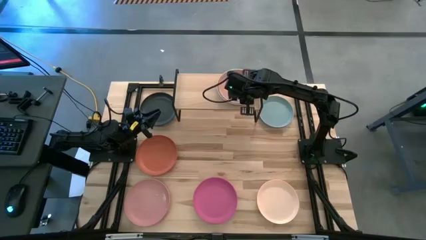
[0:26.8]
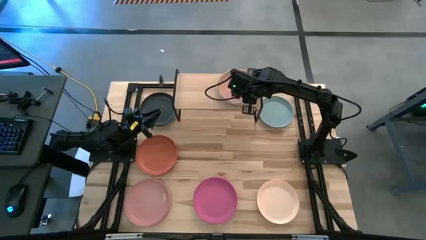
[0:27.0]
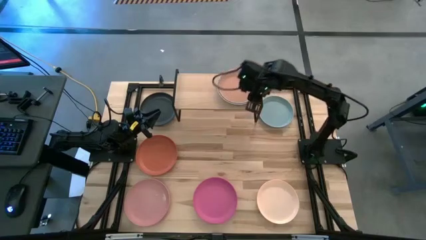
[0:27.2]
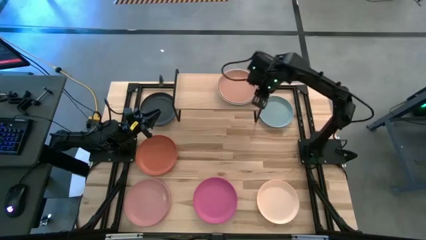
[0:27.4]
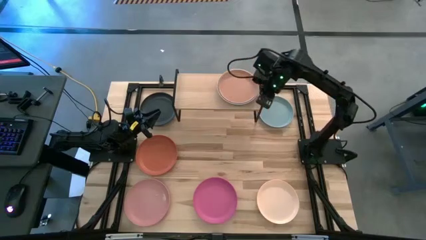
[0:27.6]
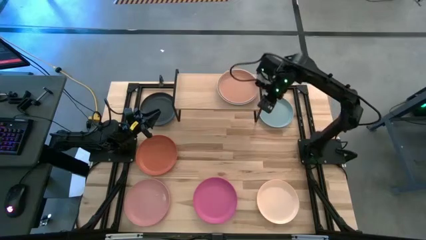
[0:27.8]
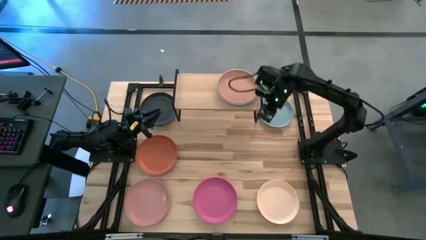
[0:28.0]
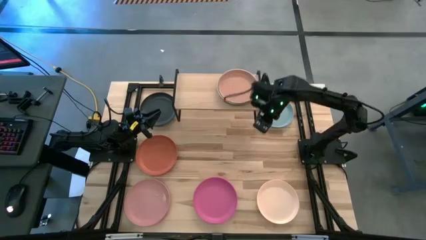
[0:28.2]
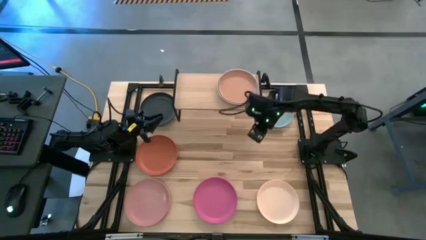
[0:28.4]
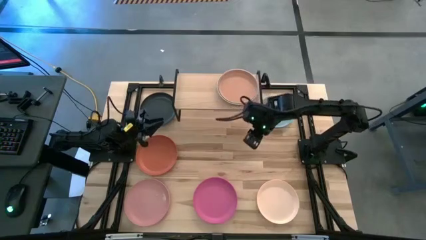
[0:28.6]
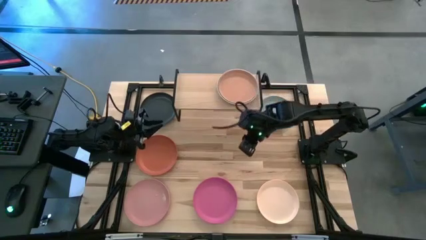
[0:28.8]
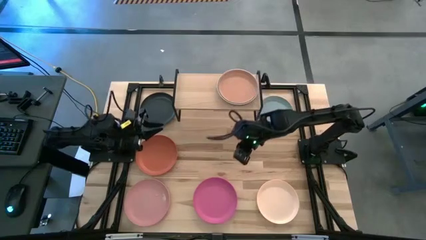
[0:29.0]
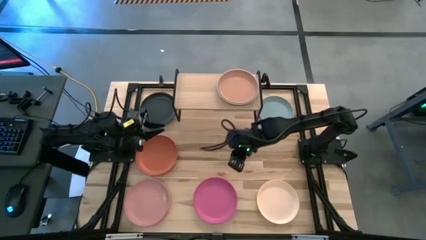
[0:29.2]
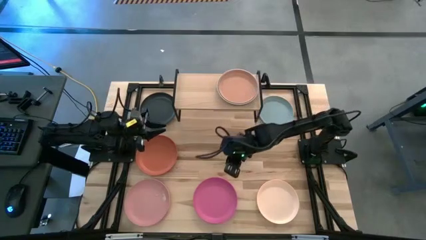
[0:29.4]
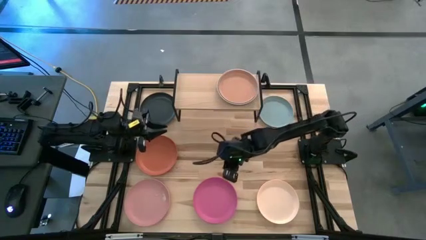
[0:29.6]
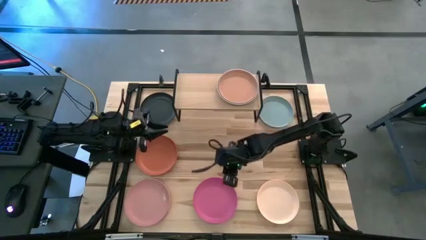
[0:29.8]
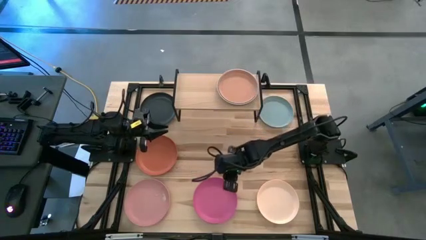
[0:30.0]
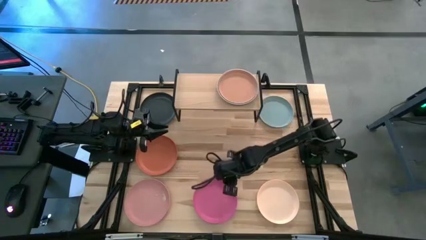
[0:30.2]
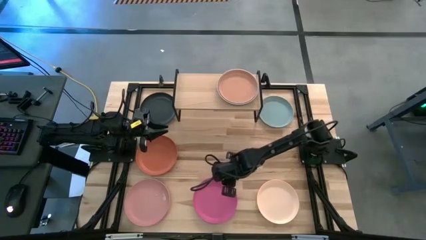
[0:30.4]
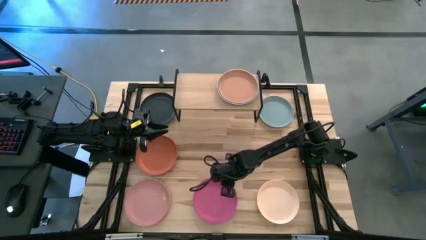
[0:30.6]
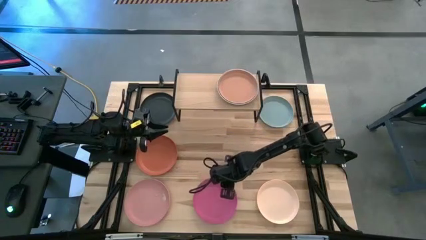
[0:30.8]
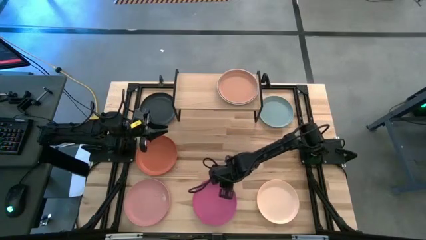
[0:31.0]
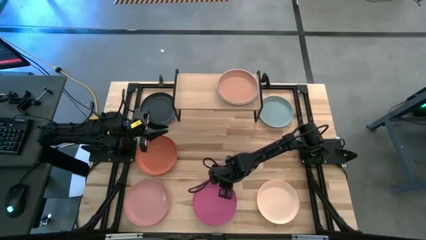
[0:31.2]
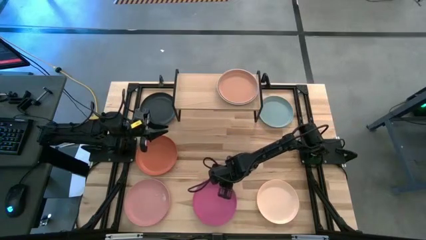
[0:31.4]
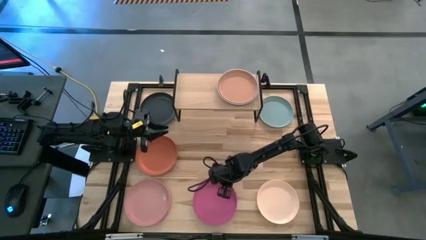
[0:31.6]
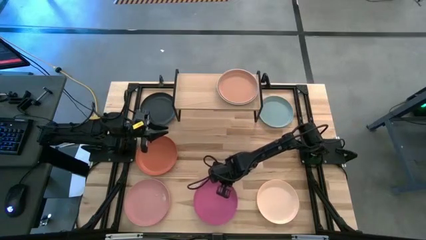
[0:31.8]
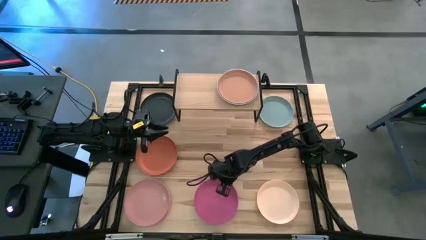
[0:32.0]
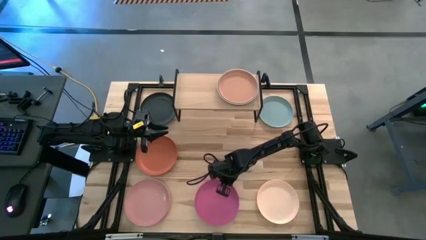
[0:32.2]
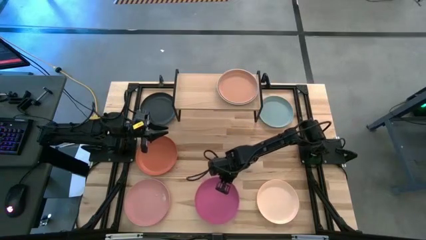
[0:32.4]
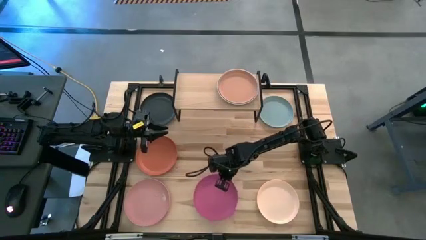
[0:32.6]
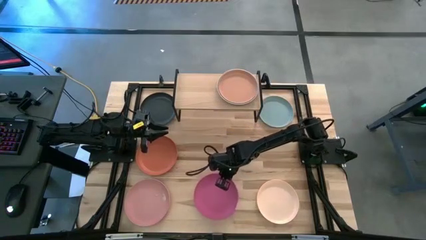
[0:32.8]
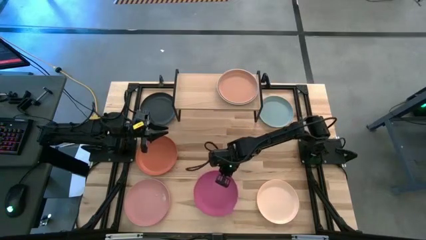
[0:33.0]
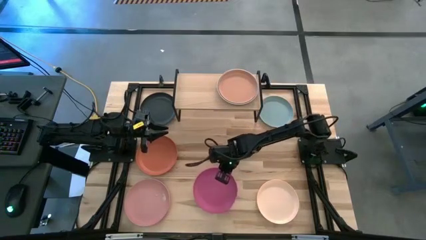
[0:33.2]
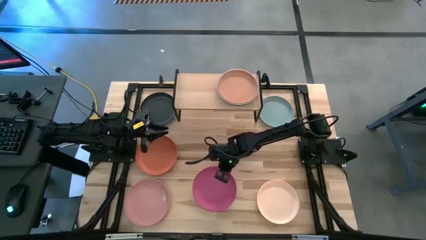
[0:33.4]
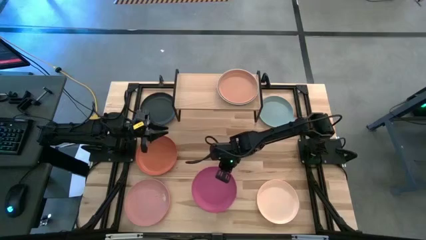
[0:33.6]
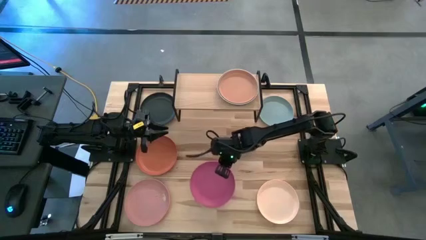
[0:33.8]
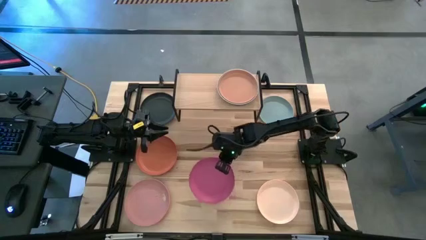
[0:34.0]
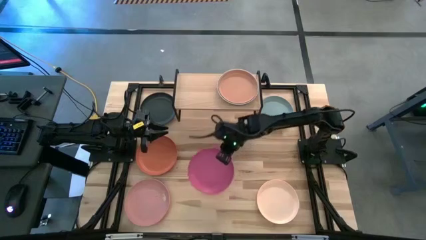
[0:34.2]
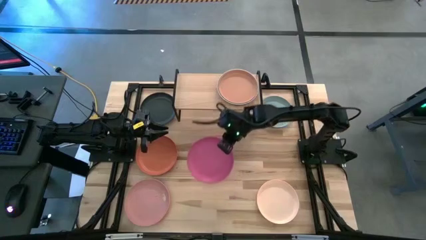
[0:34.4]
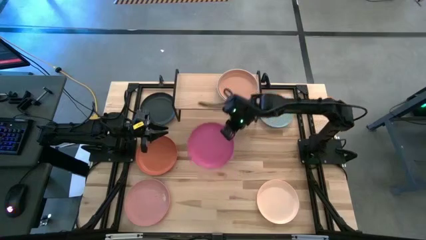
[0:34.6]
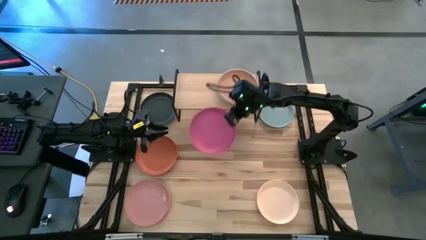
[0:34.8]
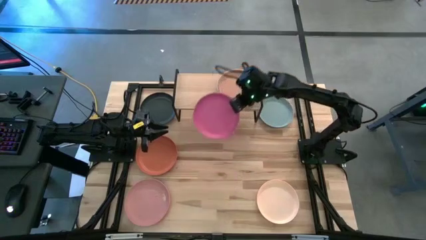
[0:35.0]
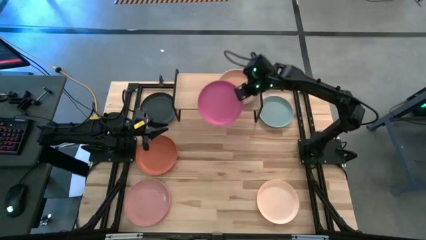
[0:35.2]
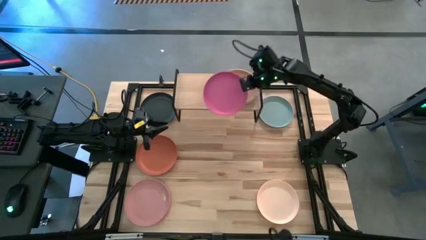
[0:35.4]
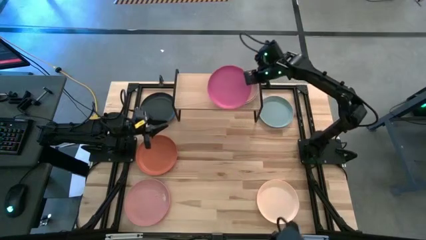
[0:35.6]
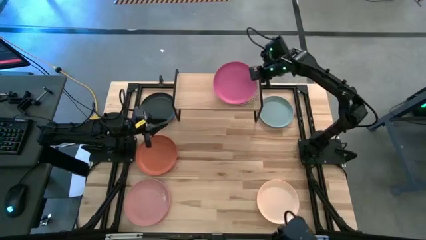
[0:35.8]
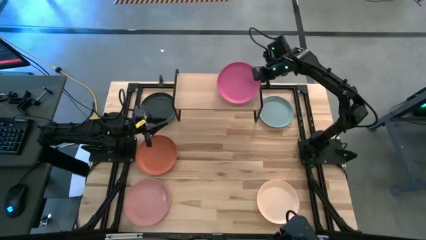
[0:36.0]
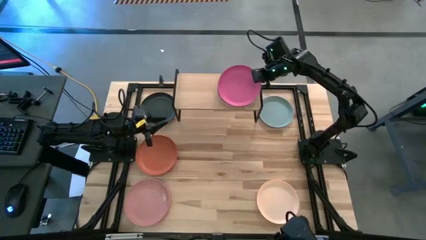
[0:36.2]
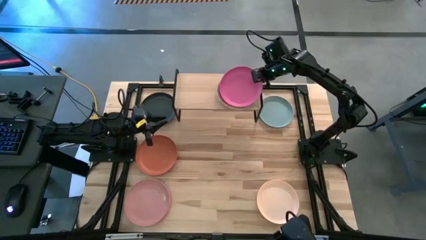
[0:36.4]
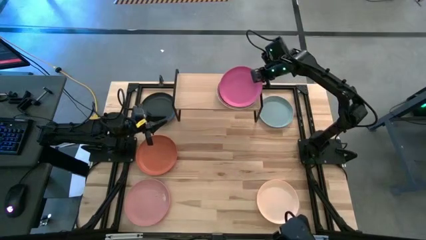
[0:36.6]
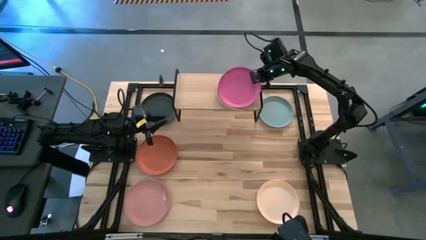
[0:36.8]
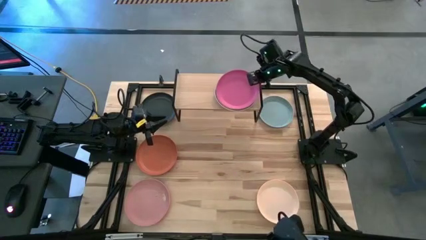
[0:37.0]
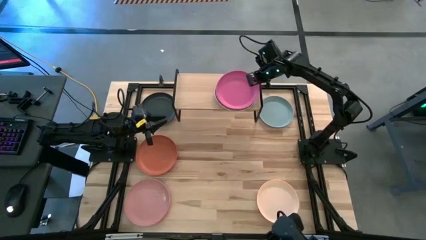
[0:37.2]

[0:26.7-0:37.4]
Task: Place and stack plates onto a shelf
Stack the pink plate on top of the brown plate on the shelf

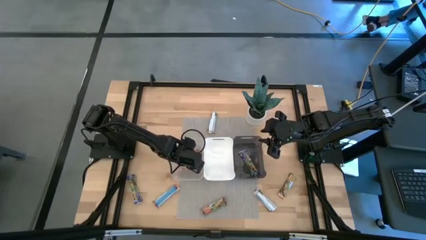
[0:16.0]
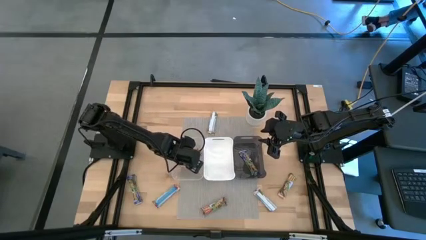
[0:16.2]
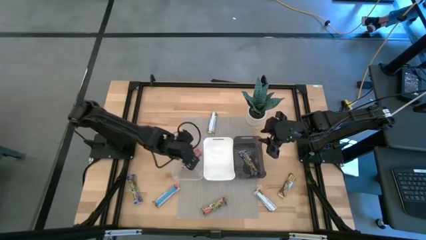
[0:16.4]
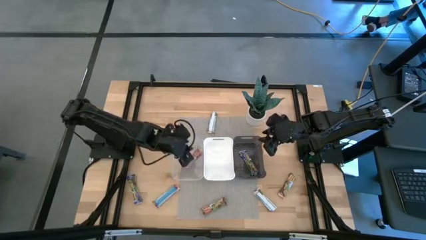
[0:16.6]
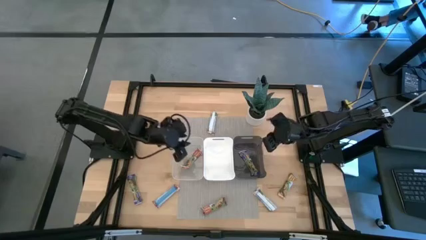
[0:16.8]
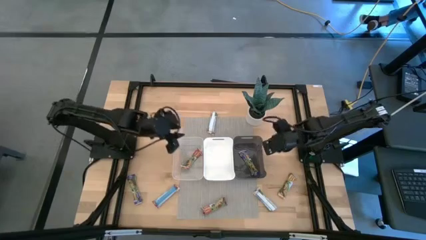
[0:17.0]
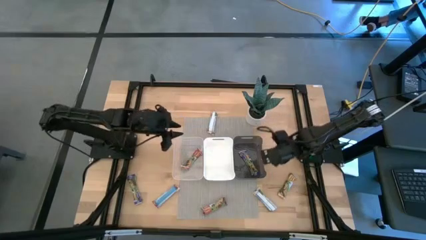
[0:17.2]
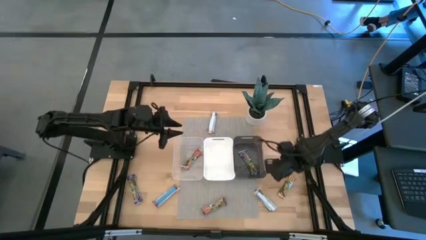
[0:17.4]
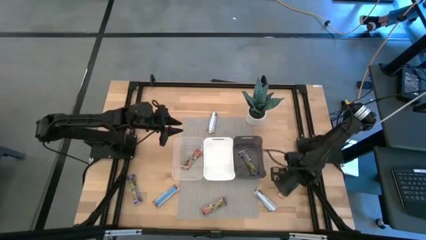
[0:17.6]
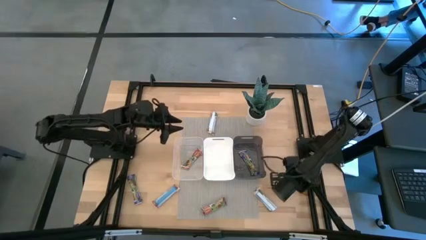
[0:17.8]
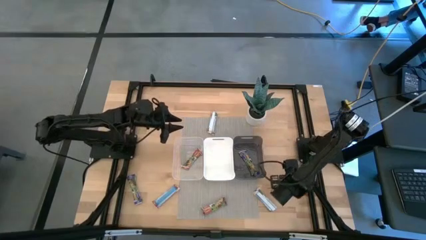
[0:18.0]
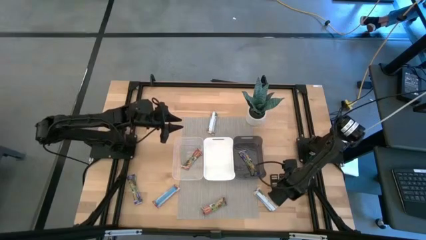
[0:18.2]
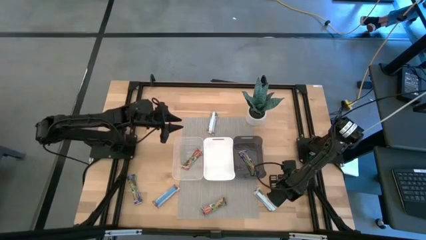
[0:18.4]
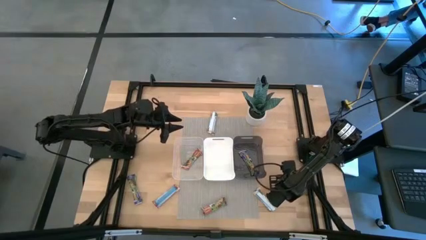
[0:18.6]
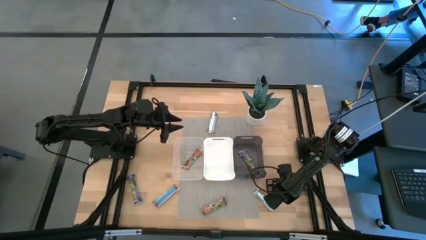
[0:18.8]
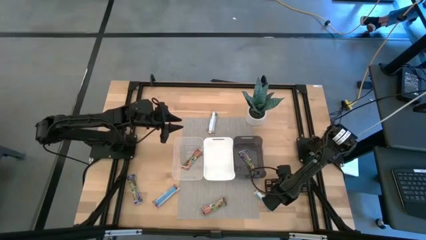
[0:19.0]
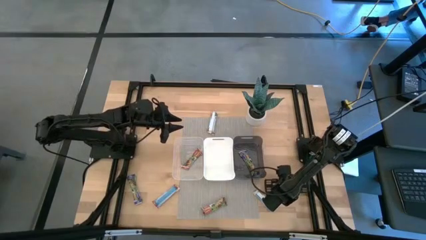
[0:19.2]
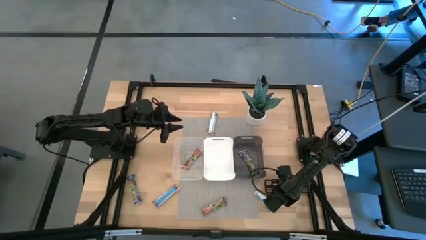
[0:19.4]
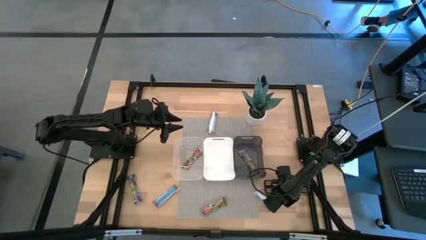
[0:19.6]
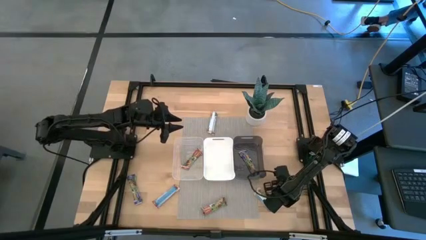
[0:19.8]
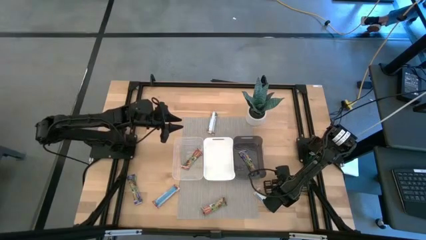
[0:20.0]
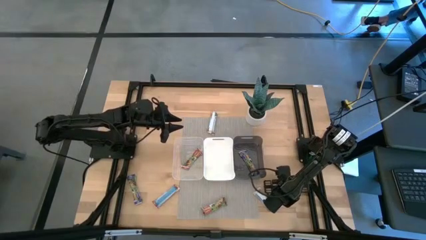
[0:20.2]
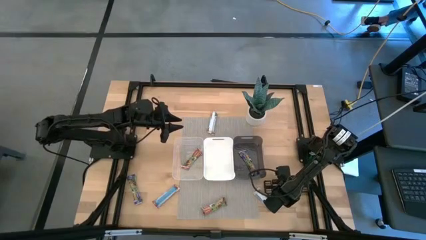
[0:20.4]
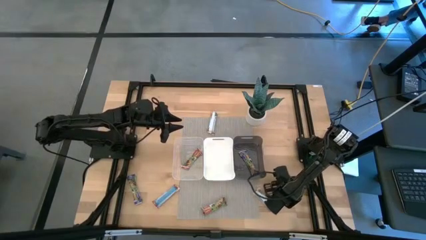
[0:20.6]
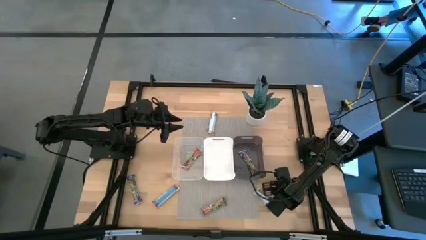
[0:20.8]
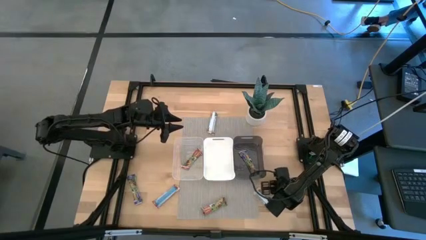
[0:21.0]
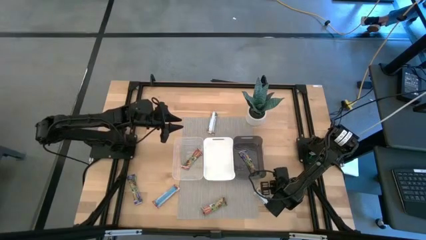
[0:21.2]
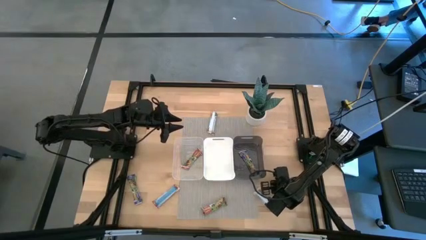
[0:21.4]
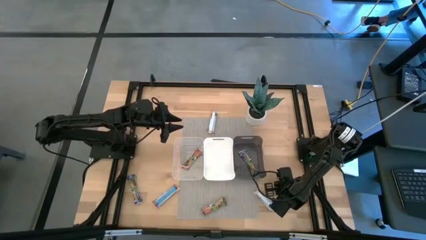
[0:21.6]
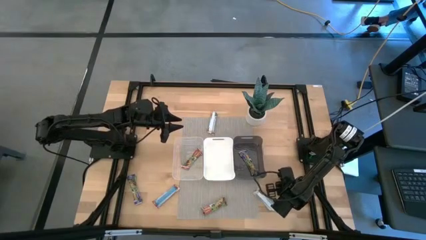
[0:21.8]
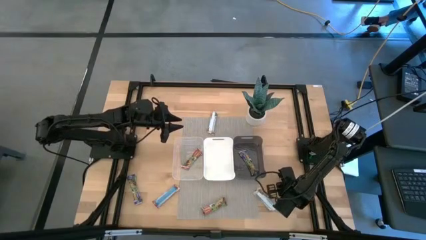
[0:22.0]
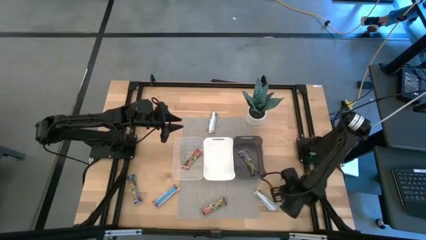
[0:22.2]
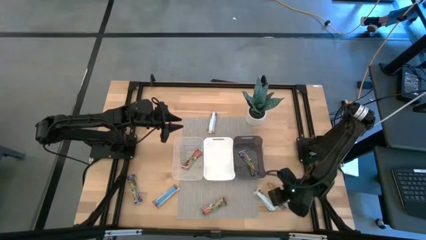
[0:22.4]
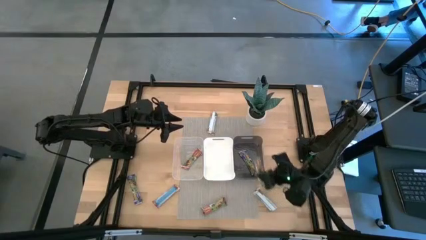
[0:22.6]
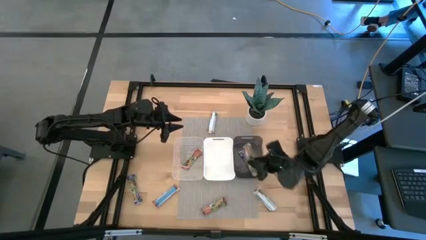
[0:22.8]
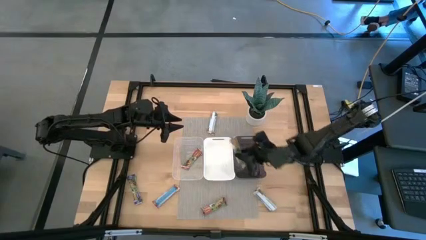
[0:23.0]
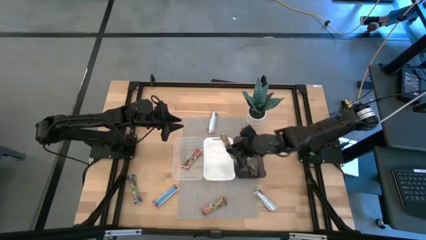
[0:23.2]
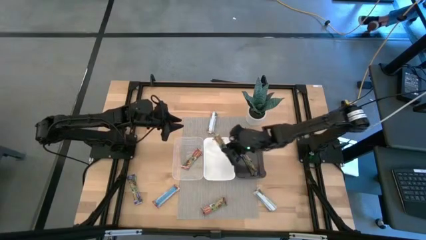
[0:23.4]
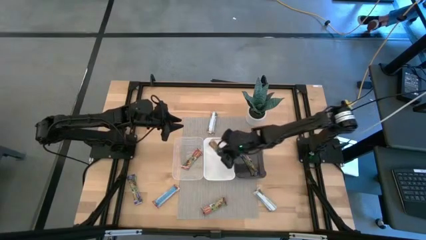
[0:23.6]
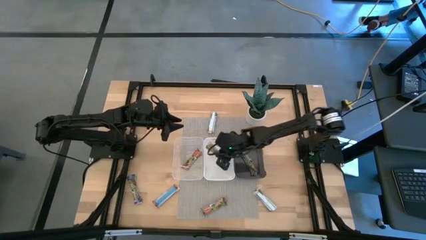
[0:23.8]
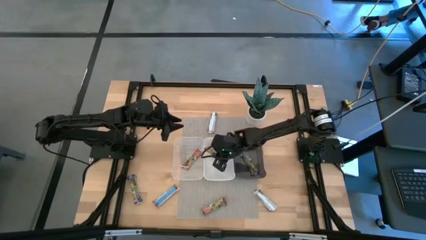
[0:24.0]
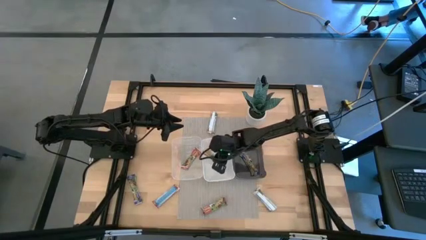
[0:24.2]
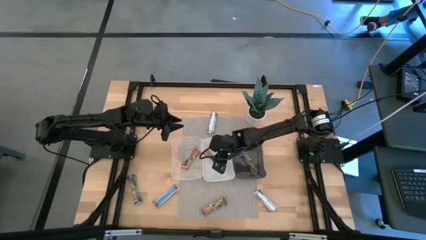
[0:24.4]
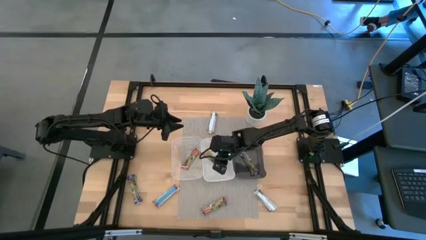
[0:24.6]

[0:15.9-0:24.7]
Task: Pick and place Granola Bars by type
Put the bottom right yellow granola bar into the white bin
